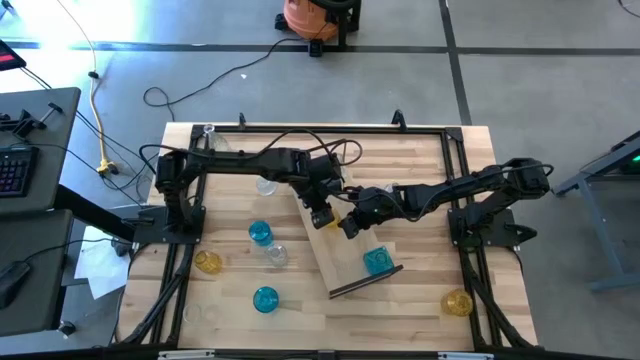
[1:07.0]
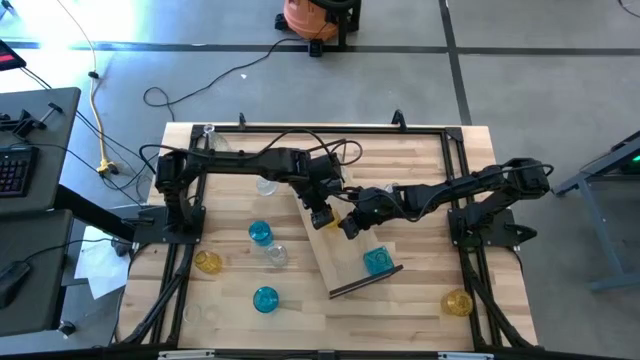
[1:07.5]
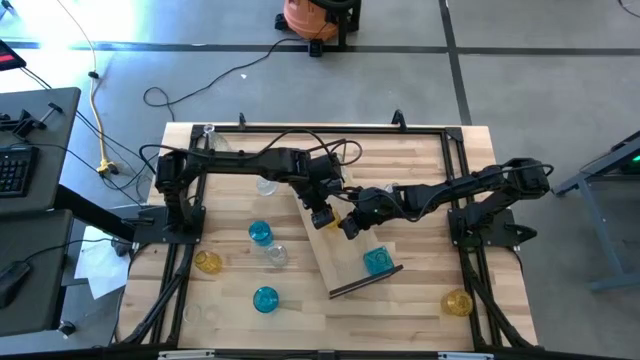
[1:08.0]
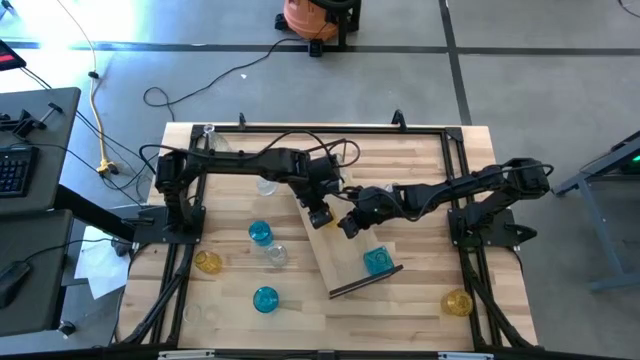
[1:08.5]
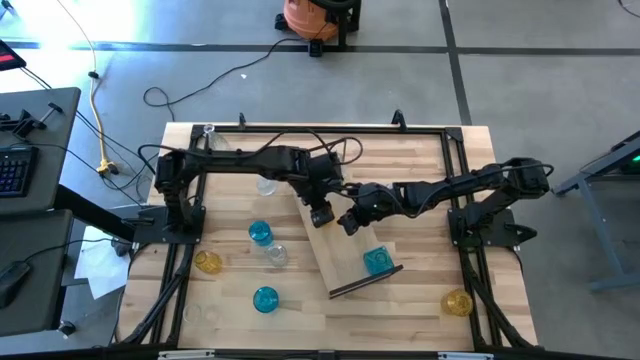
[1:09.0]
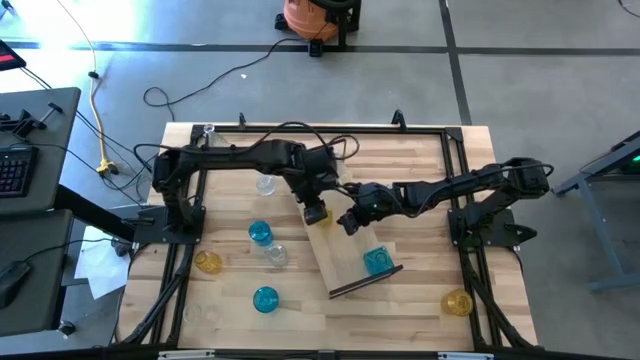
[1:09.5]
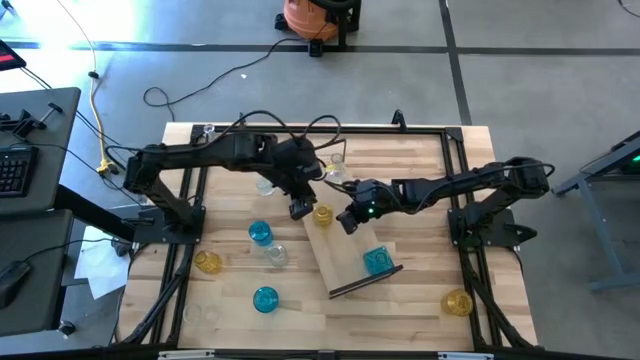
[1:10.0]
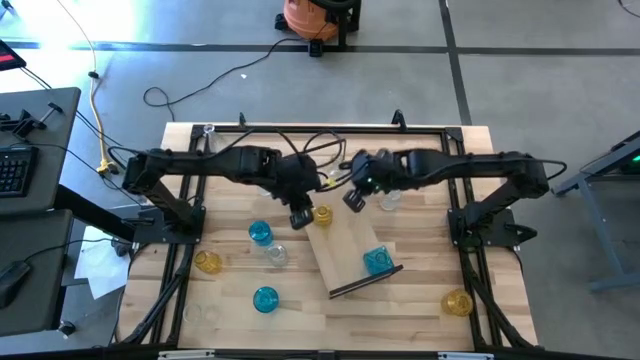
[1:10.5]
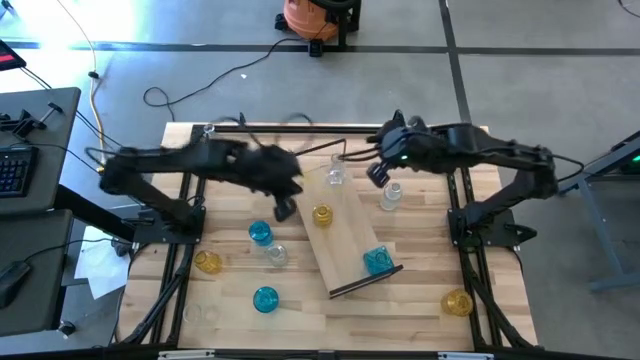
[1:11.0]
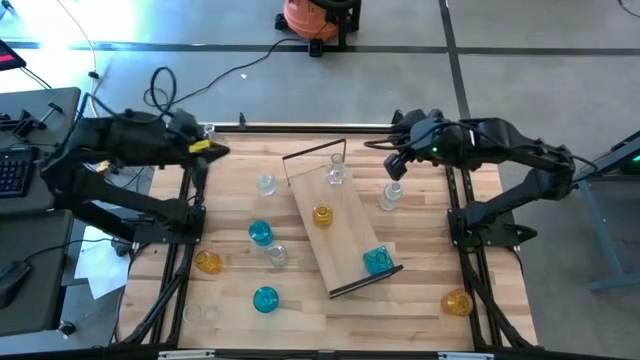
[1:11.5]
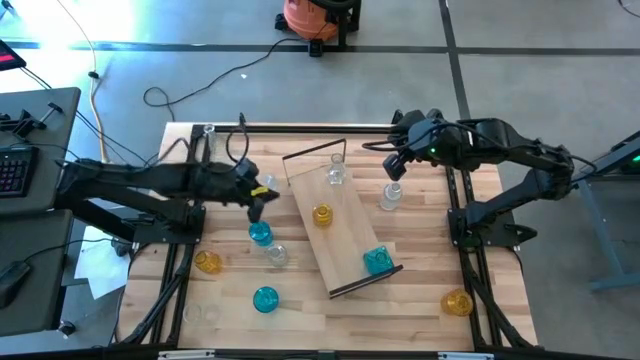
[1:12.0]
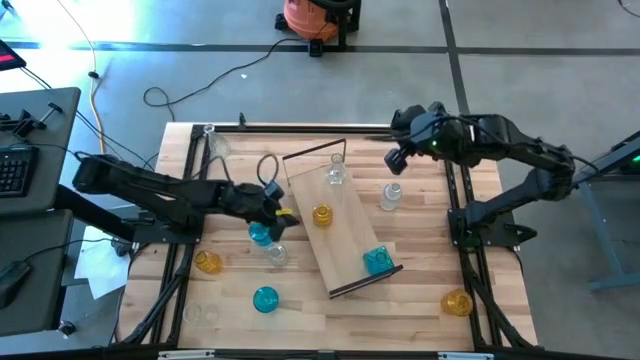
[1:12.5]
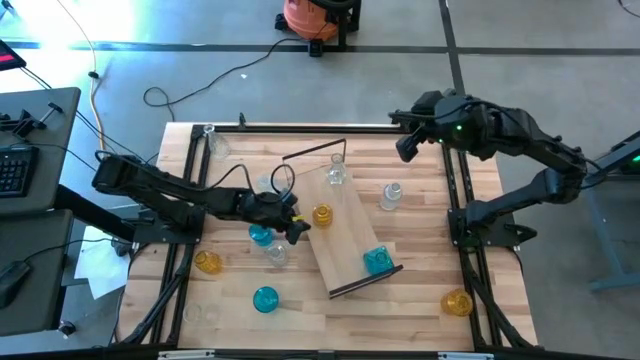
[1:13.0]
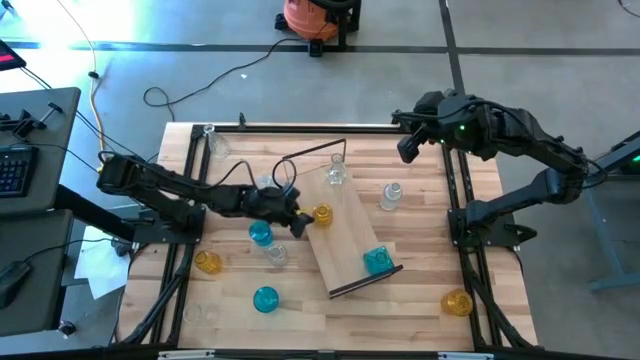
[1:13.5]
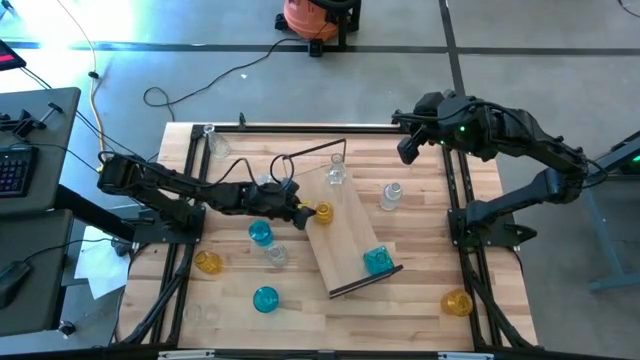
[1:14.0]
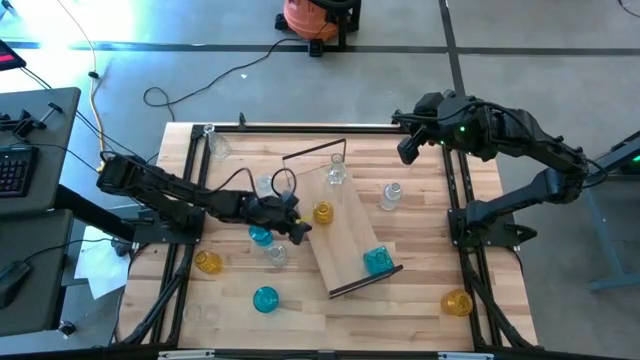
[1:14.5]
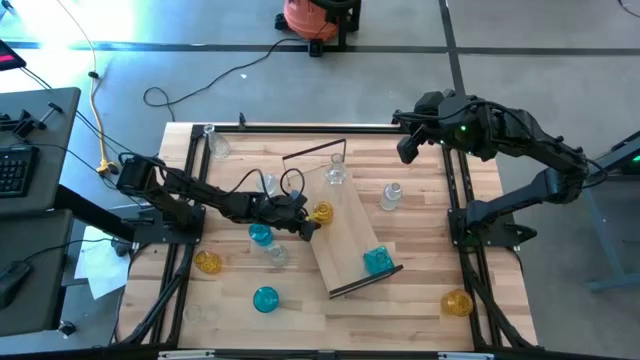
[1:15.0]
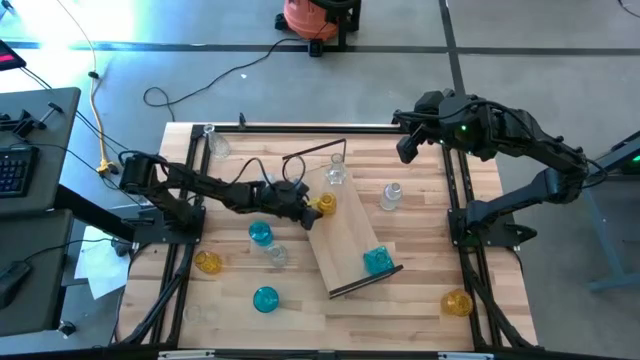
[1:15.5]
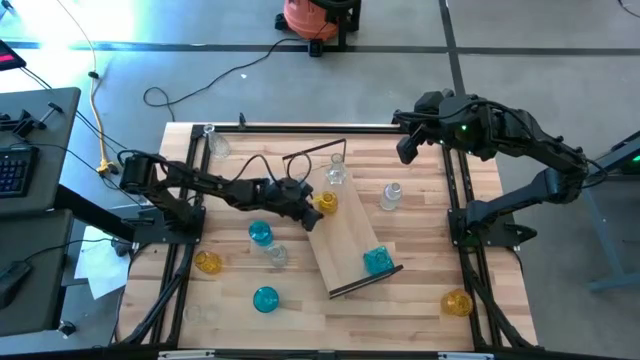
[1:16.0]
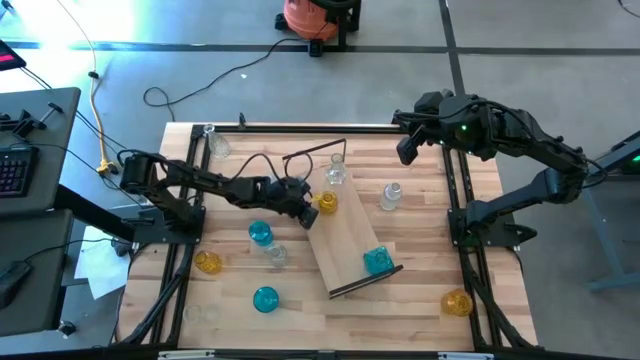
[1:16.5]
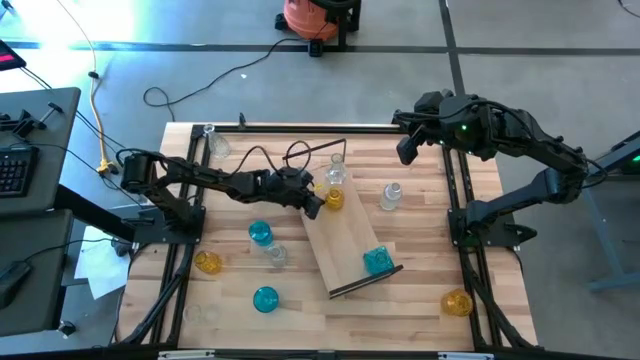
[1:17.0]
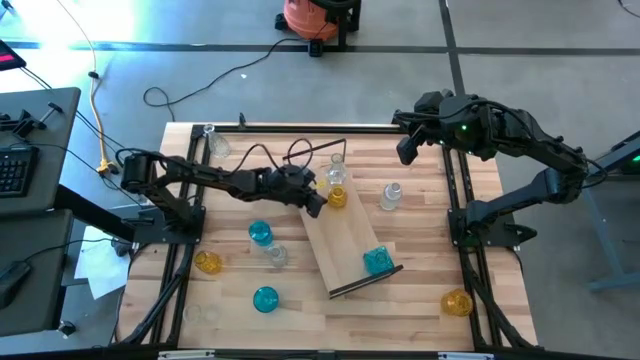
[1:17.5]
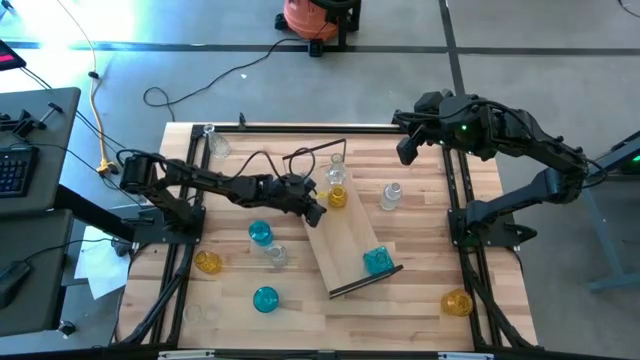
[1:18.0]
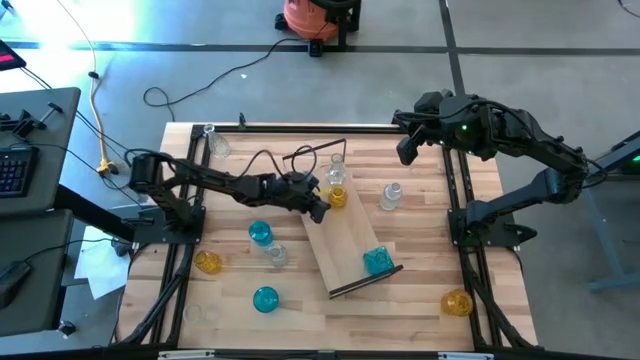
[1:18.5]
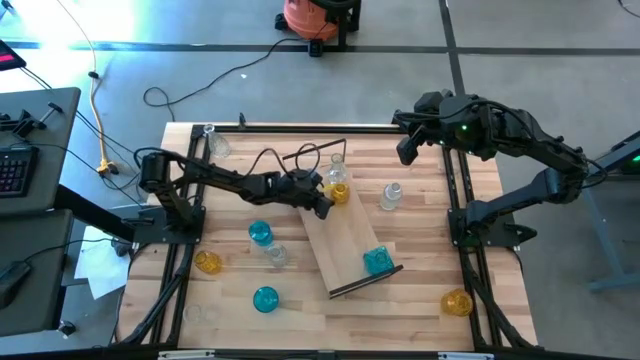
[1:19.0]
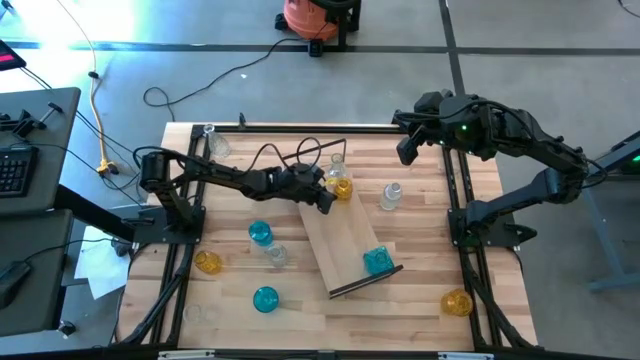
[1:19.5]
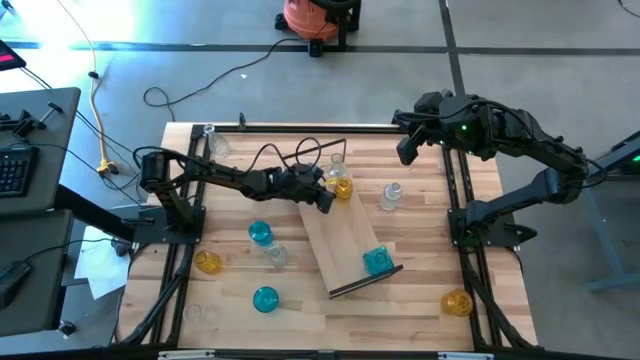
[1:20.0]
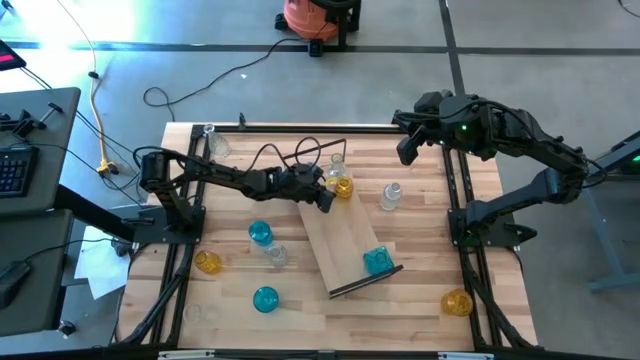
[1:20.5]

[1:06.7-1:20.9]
Task: sort vases onto shelf
Put the yellow crystal vase on the shelf

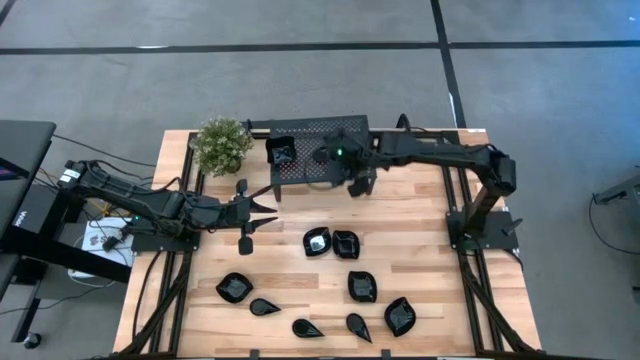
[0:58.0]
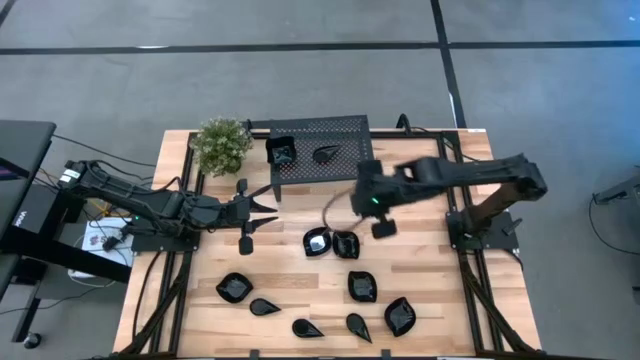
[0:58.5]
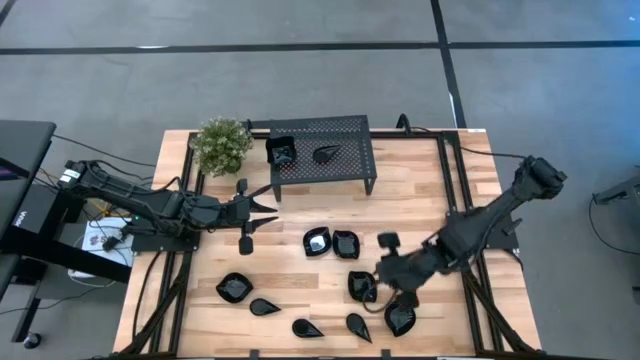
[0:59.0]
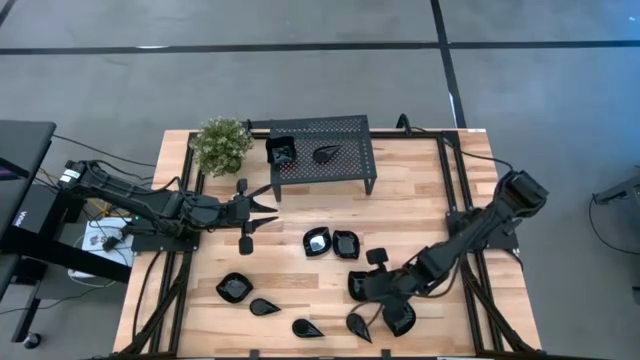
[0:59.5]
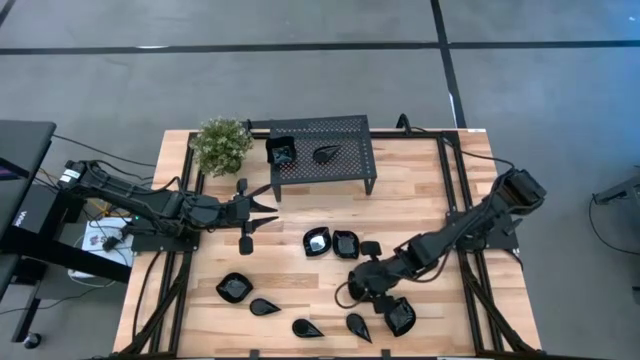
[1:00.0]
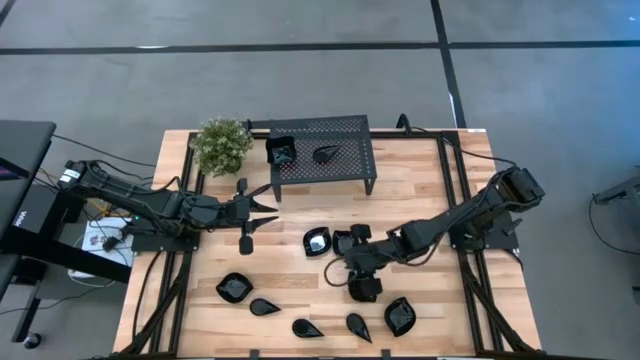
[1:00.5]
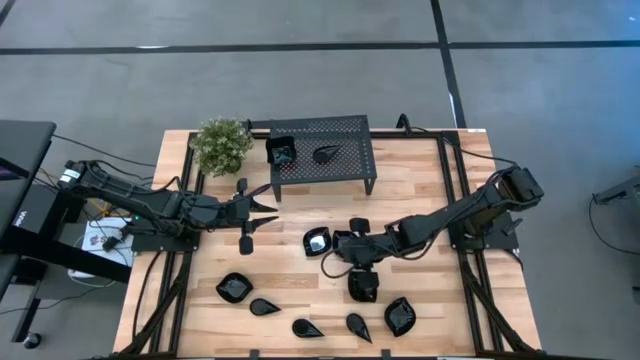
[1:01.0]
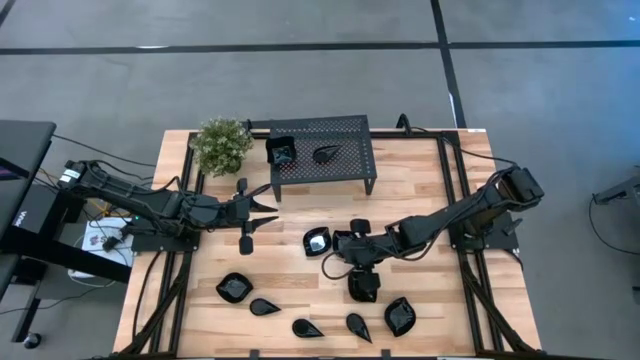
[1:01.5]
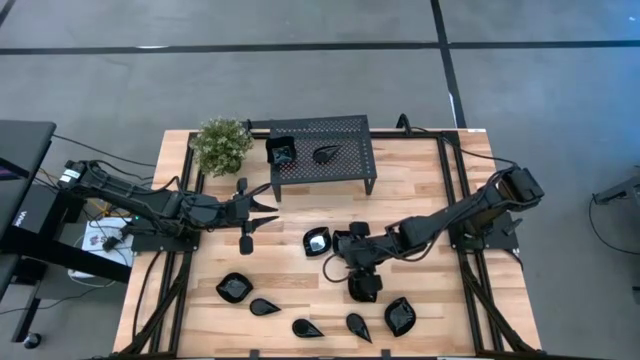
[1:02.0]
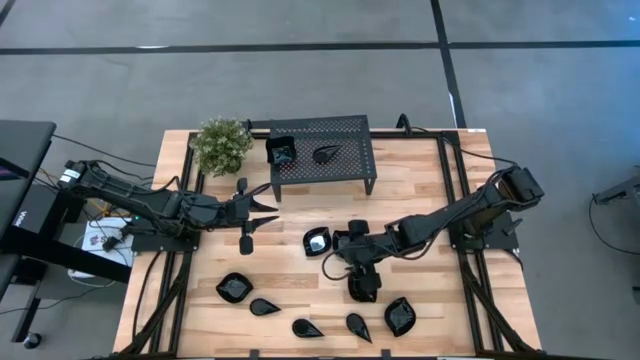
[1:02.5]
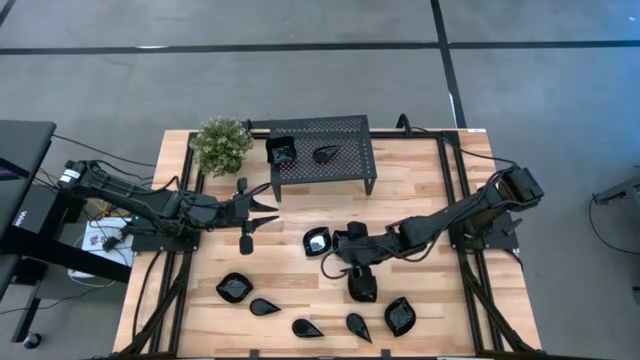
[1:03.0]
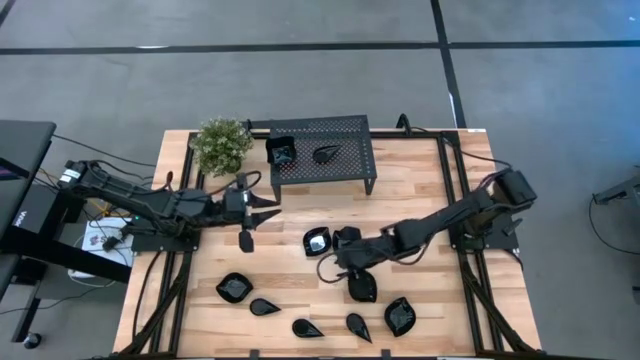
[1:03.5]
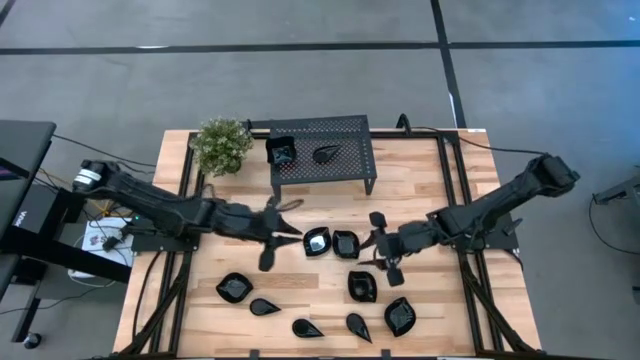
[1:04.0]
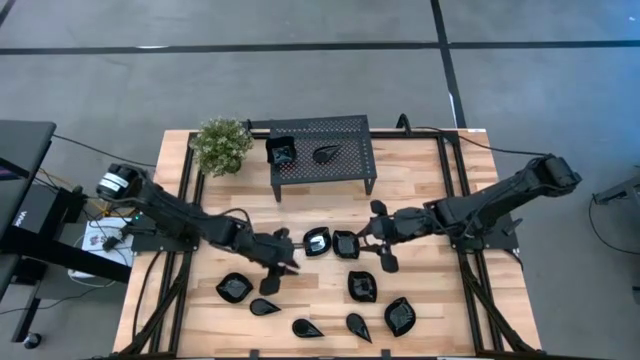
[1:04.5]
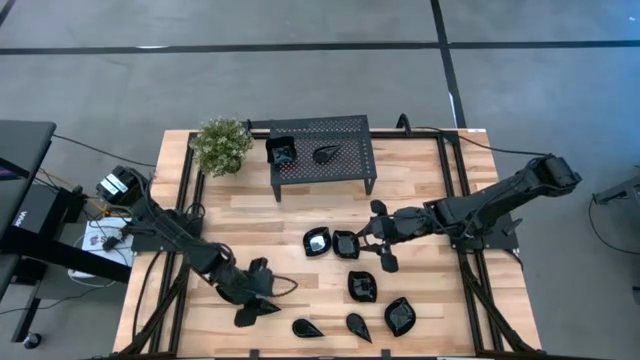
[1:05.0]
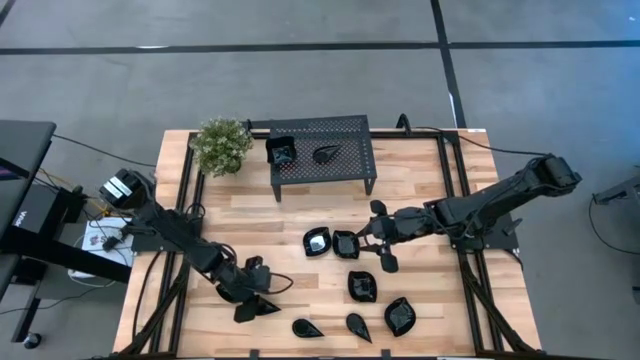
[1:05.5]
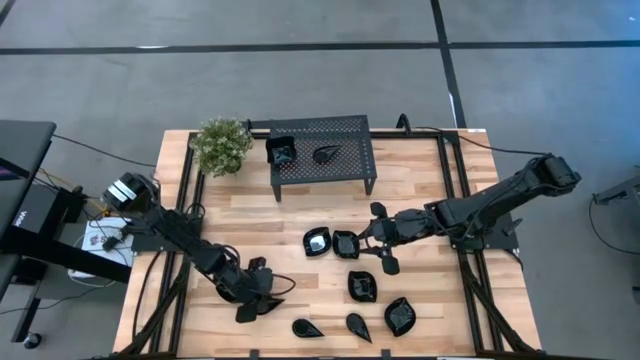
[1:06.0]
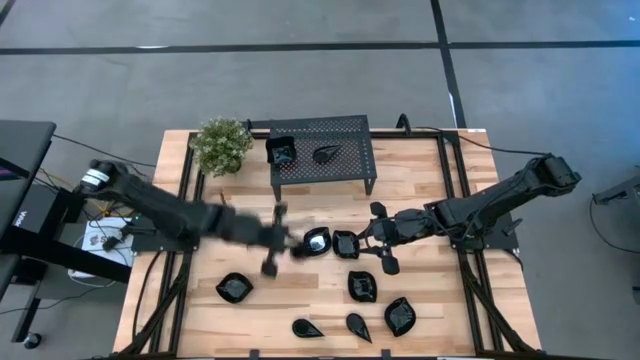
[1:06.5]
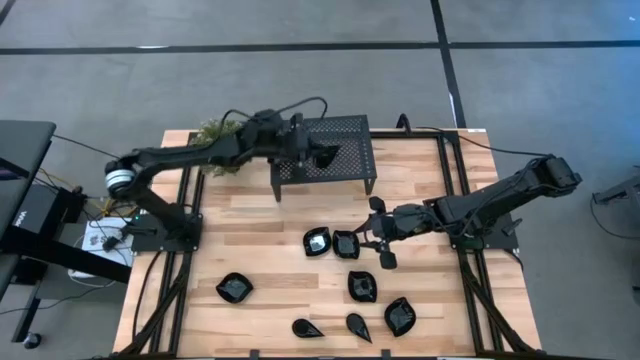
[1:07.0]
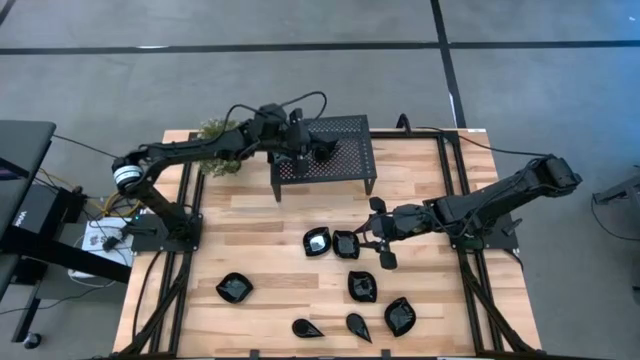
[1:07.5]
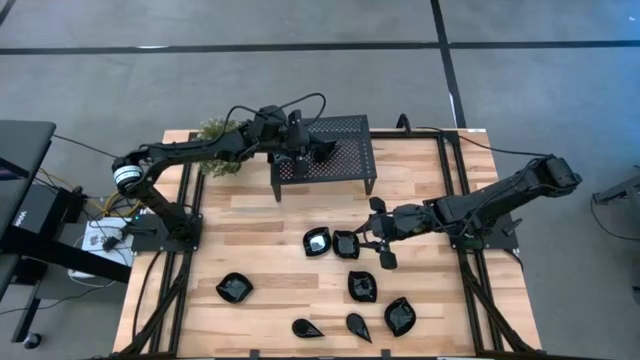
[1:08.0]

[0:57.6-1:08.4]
Task: Pick & Place Mini shaped plates
Stack the drop shaped plate on top of the drop shaped plates on the shelf
